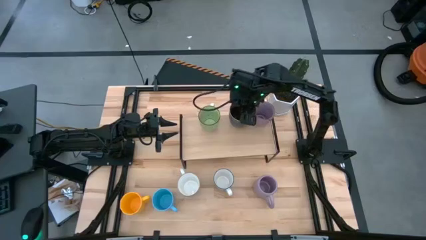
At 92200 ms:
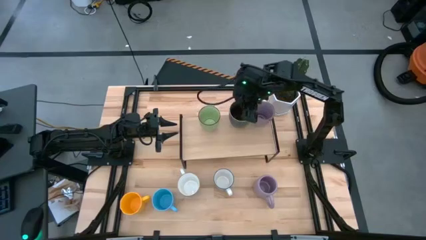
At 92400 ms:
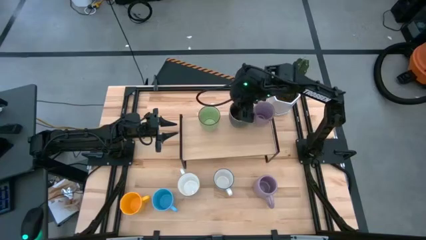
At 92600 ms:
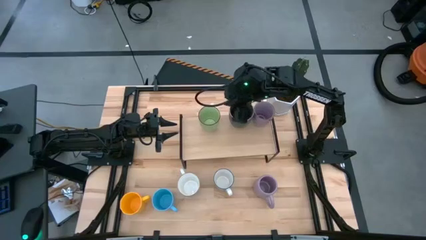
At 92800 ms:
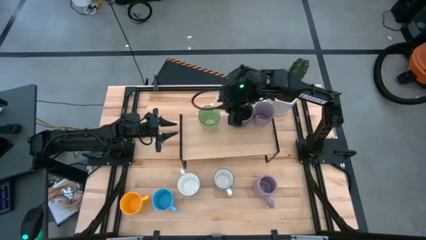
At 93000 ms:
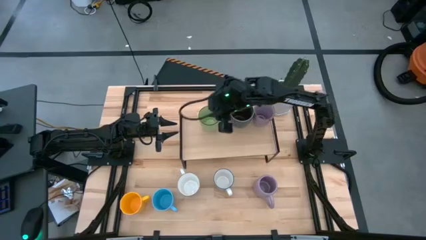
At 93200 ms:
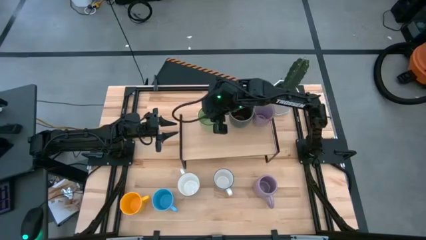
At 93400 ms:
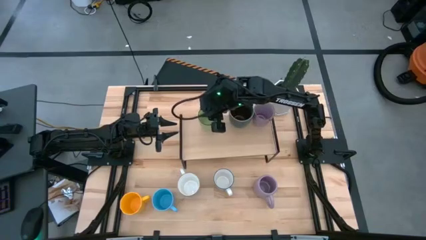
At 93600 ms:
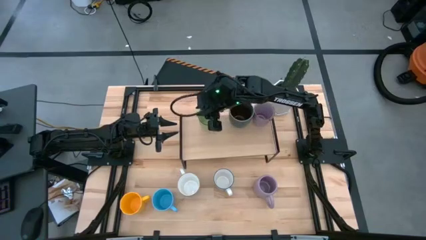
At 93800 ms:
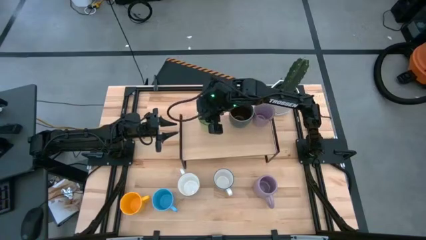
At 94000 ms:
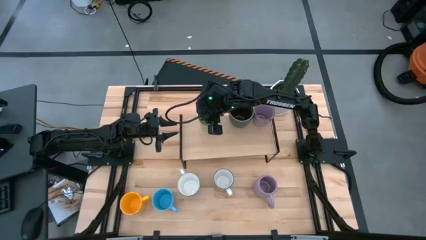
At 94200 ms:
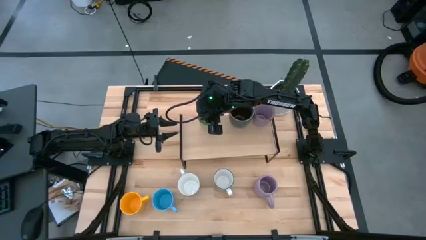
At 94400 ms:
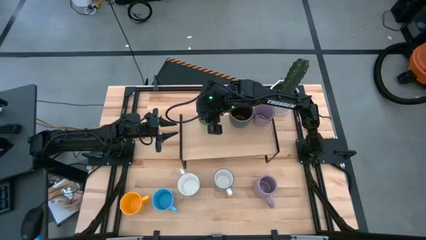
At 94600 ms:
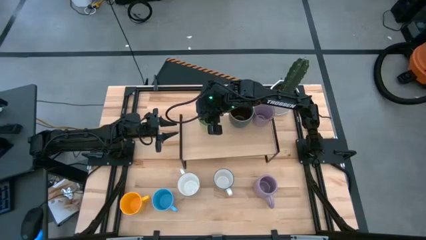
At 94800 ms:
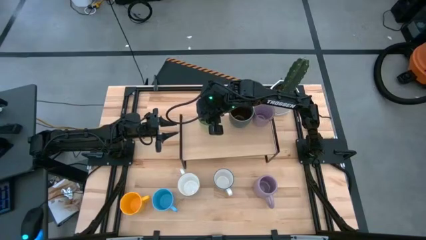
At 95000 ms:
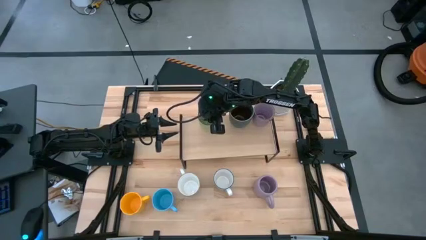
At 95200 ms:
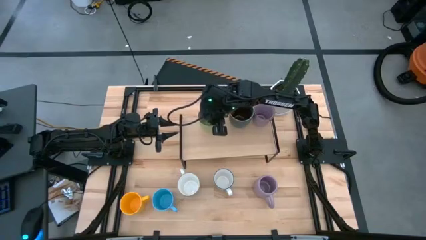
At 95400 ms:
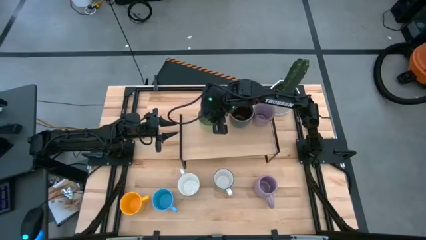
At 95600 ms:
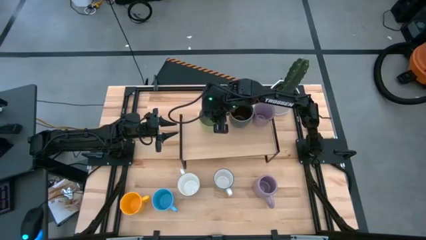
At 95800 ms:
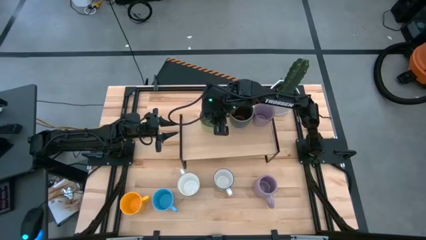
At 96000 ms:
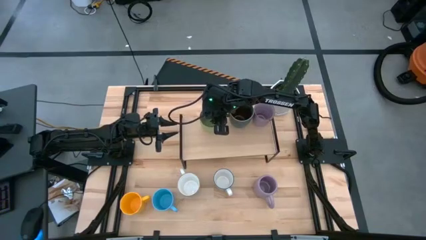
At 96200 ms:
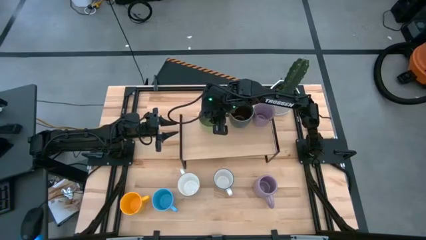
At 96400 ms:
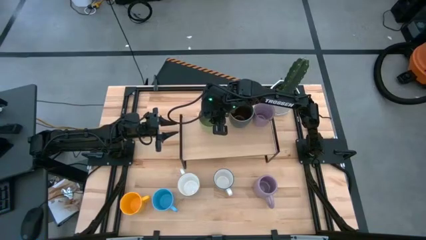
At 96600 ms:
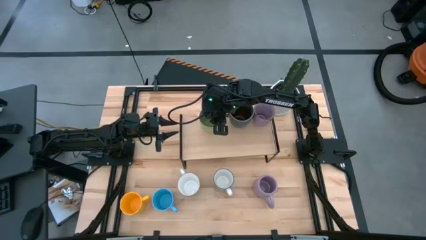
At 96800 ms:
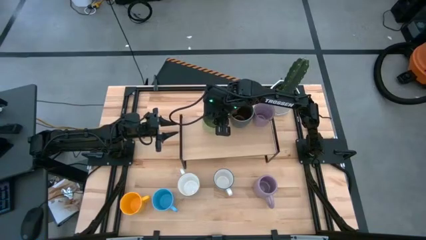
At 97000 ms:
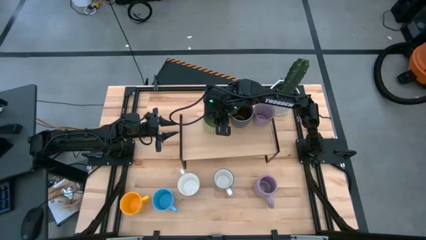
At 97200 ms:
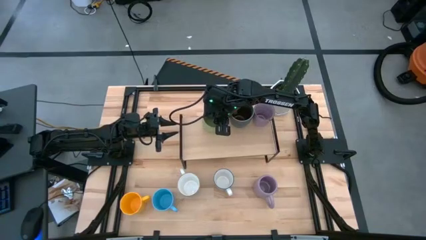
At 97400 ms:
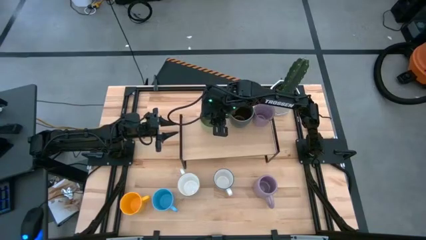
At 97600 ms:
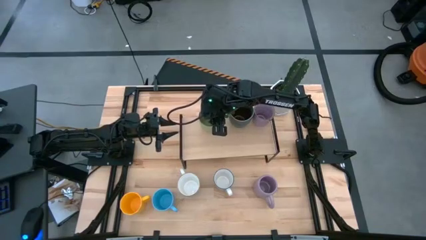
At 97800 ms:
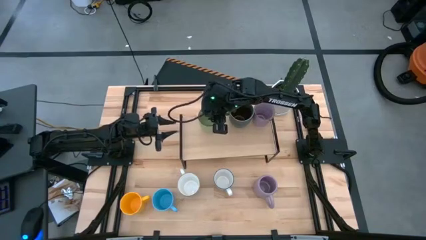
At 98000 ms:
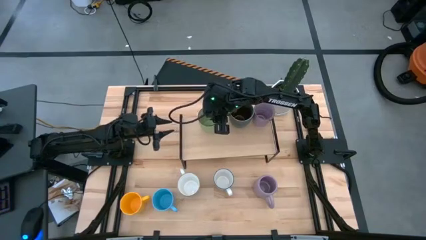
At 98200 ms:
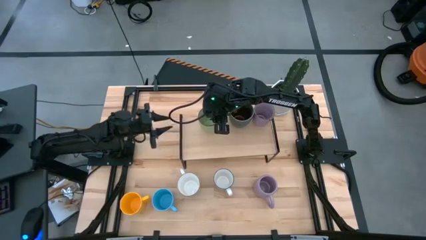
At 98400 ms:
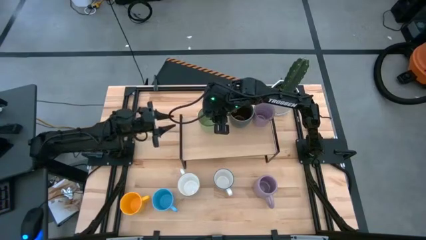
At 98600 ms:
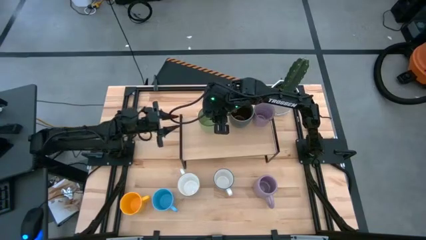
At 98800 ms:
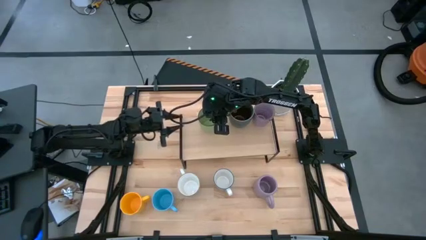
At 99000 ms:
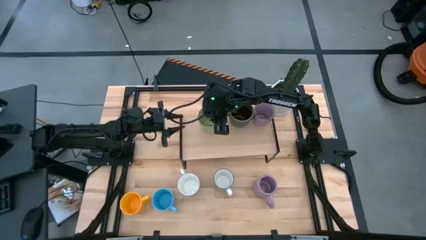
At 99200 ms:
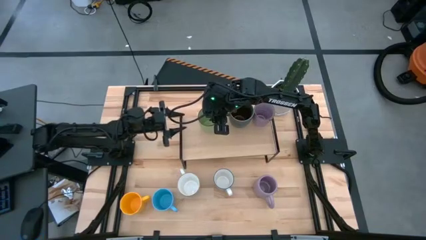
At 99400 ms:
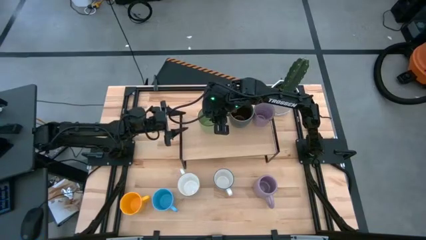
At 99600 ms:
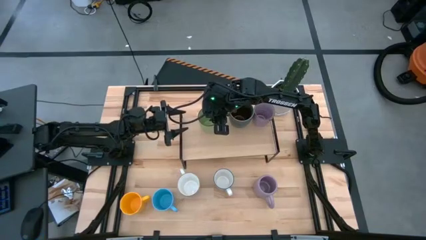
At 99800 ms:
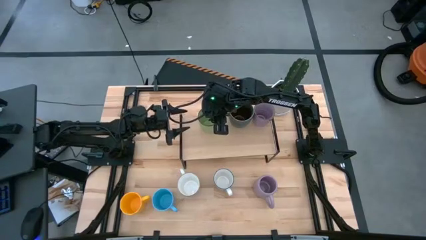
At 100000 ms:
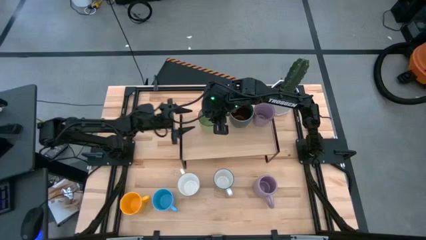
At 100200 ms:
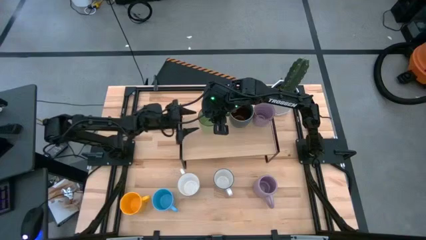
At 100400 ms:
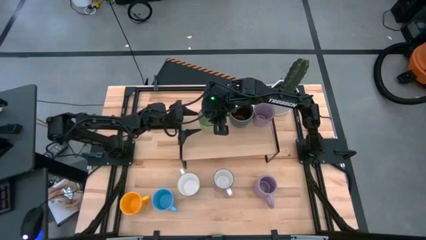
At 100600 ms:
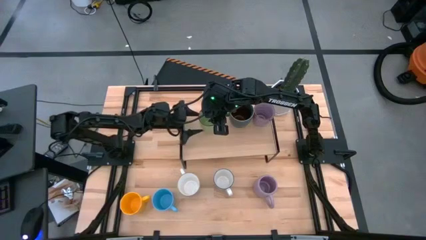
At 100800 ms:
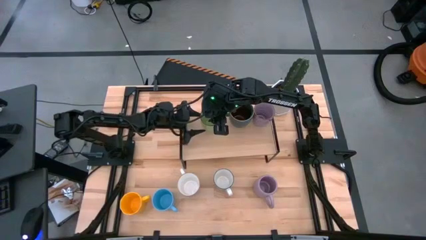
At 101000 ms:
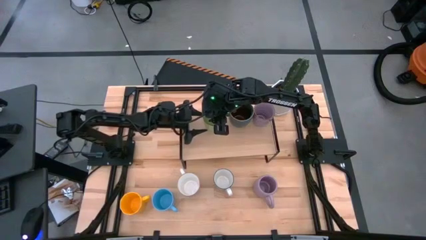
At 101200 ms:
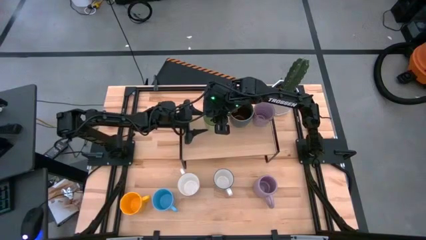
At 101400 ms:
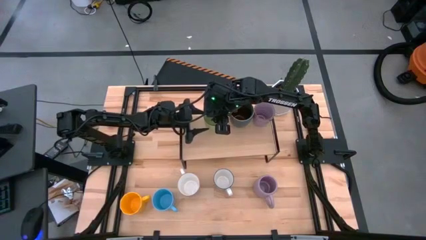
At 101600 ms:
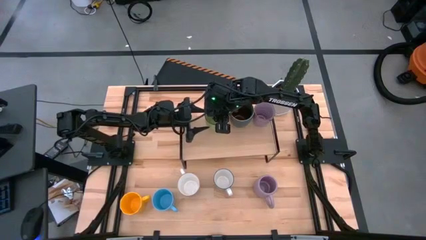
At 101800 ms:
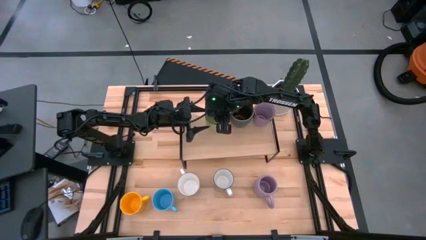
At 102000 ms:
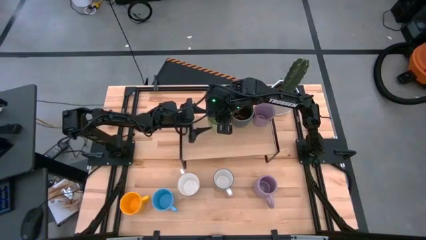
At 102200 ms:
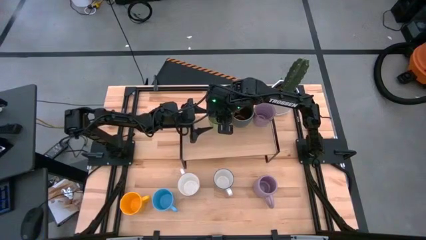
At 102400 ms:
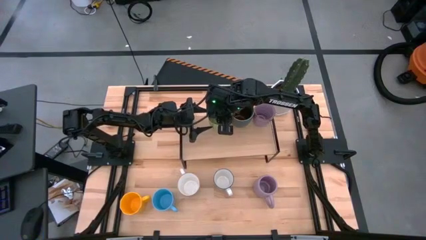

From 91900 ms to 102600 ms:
Task: Place coffee mugs
Adjust the light green mug on the shelf

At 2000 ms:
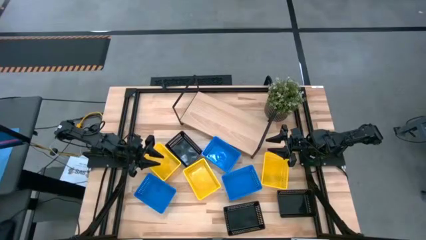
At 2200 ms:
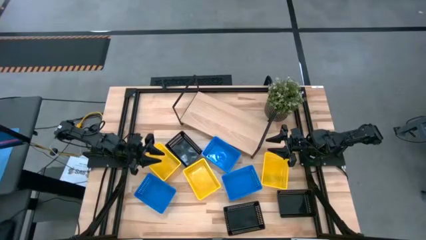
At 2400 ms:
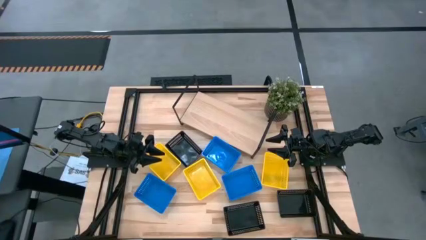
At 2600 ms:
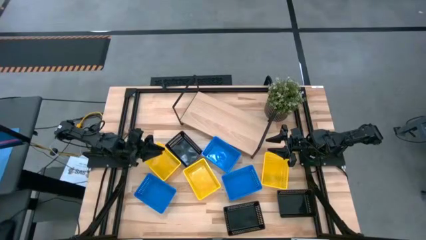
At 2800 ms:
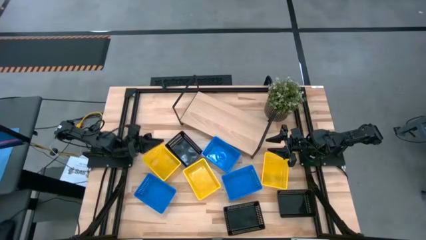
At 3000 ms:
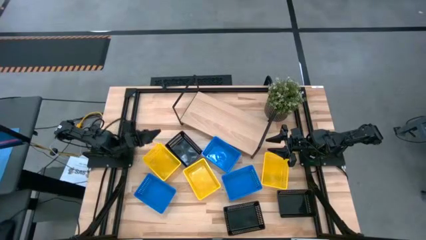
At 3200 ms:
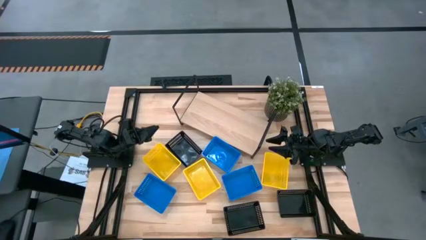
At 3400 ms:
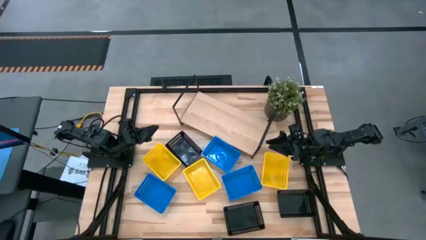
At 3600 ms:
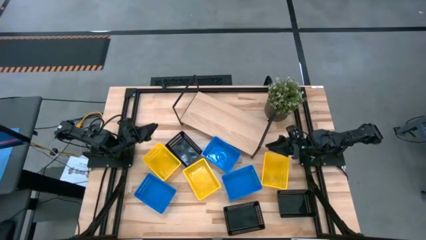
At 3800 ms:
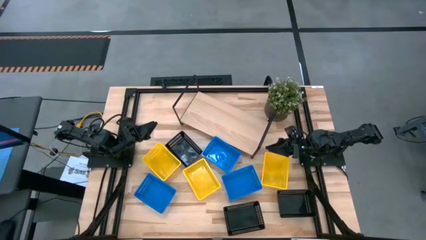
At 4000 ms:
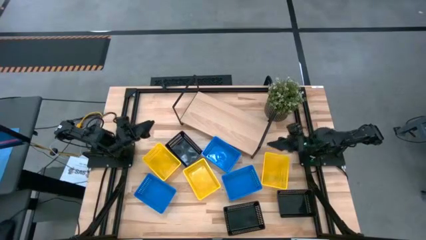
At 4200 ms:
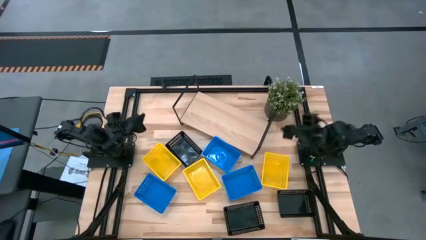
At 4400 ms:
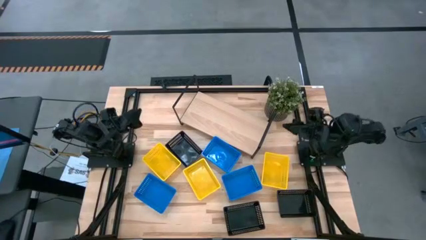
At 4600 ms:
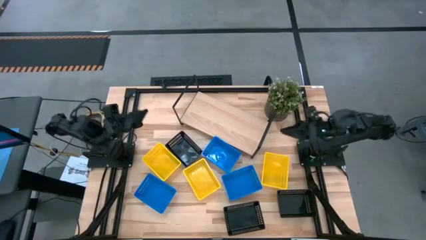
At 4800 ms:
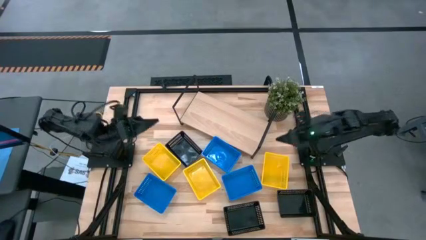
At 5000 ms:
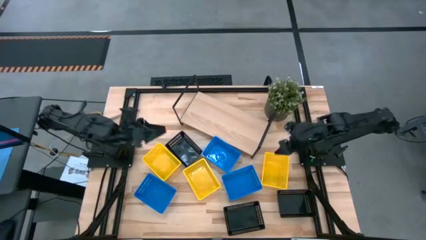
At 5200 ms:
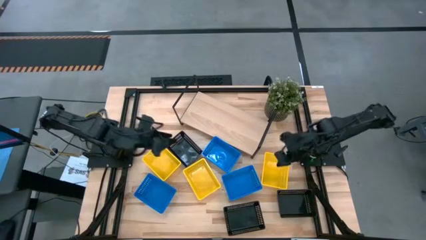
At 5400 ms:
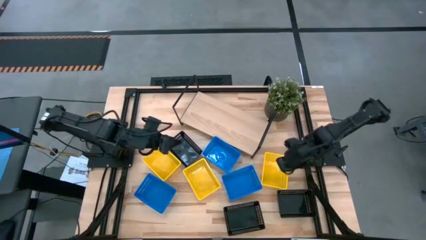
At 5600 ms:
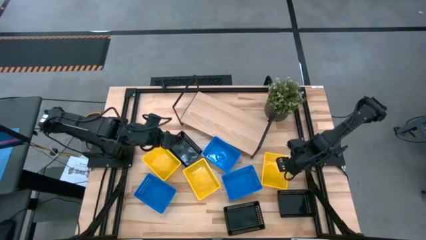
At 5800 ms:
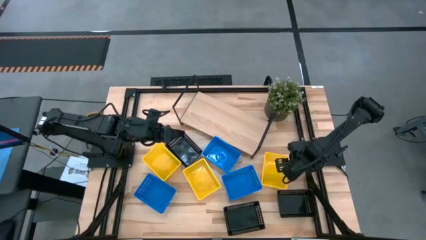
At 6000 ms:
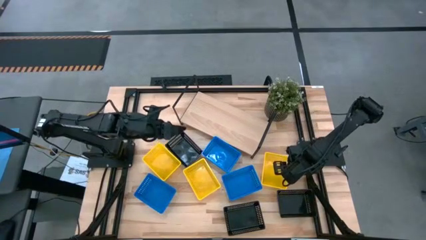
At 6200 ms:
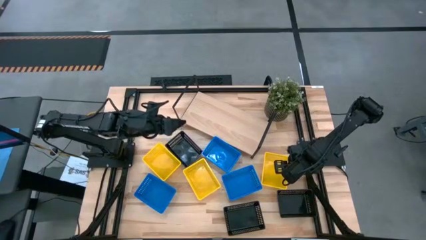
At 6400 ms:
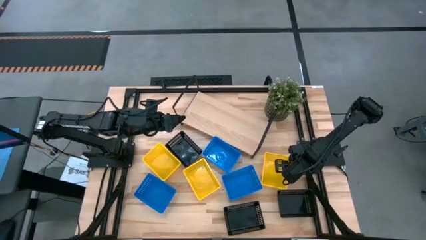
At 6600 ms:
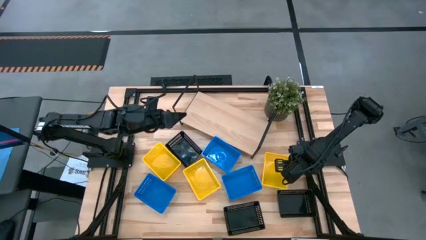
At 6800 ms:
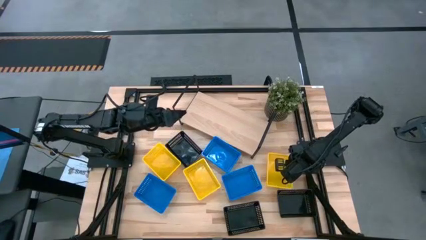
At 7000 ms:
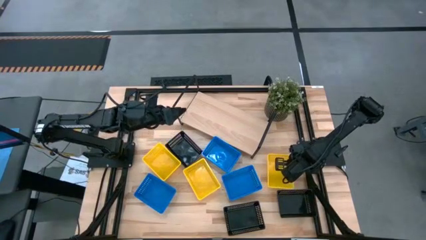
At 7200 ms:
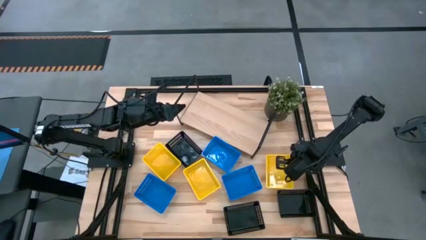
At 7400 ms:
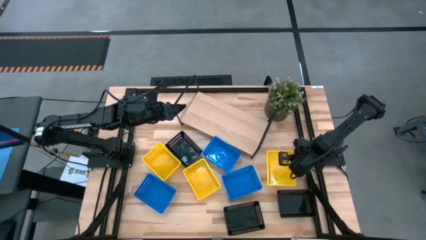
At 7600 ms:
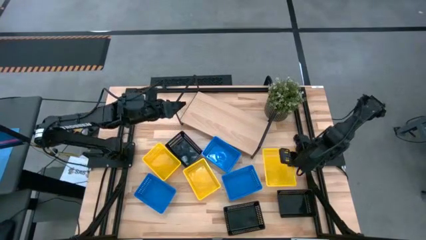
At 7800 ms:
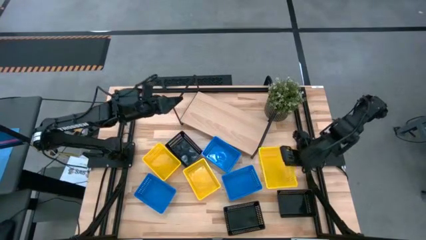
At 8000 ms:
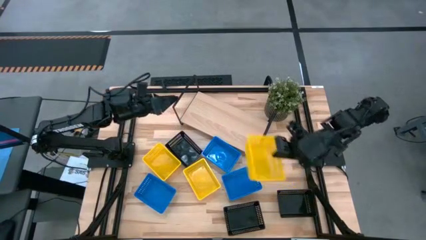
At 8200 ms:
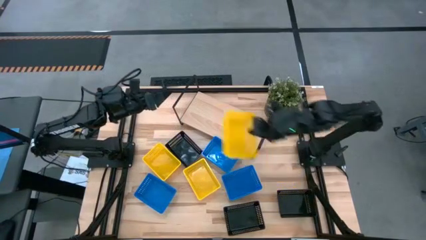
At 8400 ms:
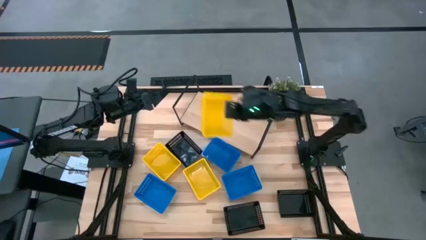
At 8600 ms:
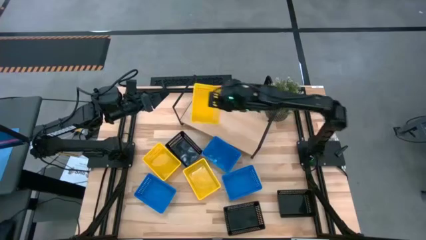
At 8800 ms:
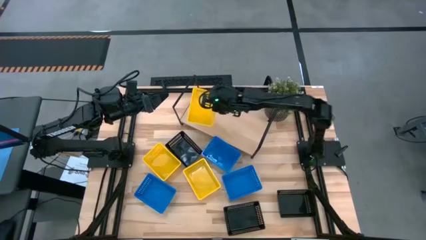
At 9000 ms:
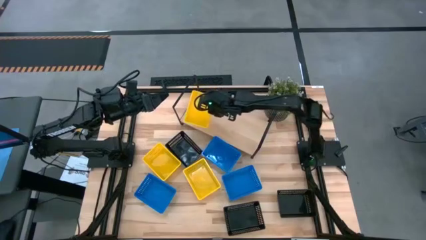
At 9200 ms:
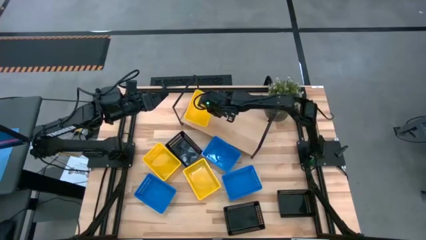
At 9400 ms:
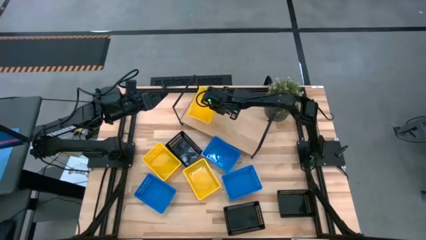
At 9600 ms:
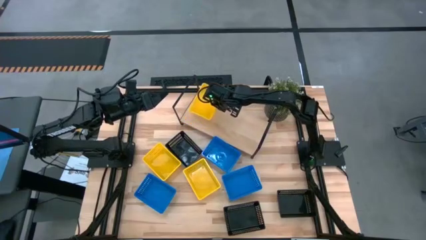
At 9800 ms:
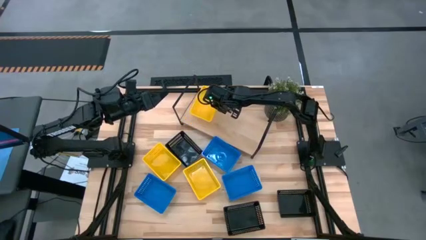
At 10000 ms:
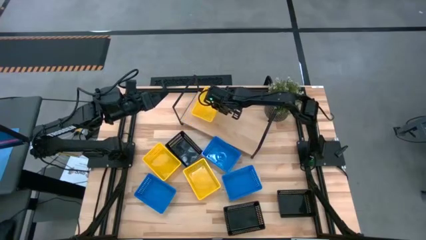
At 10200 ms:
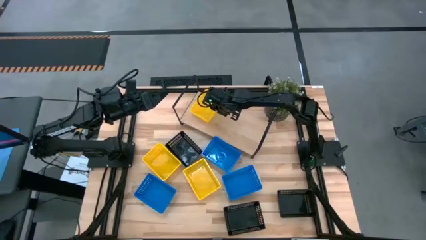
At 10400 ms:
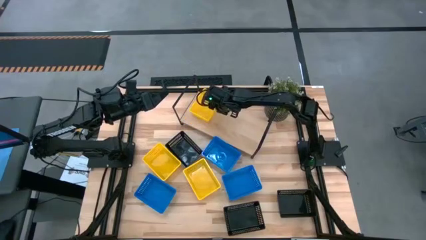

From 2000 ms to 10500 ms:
Task: Stack baskets on shelf by color
Put the right yellow bin on the shelf
